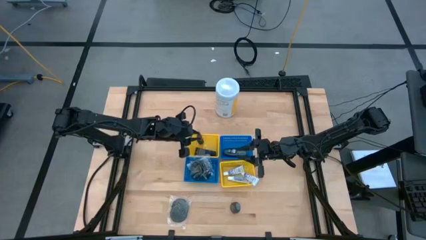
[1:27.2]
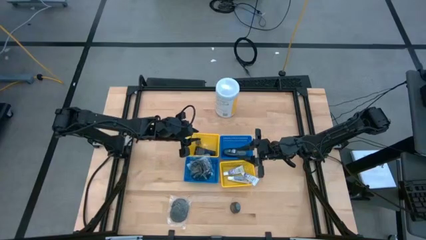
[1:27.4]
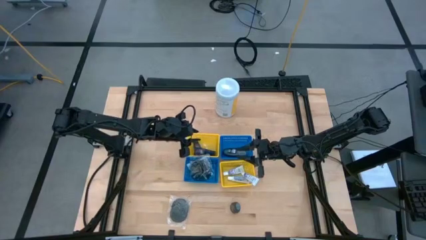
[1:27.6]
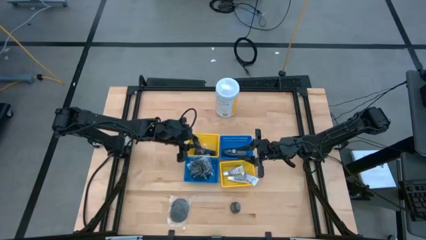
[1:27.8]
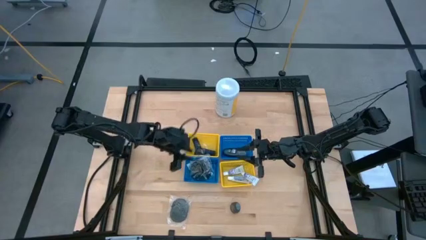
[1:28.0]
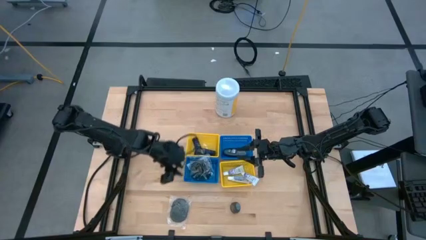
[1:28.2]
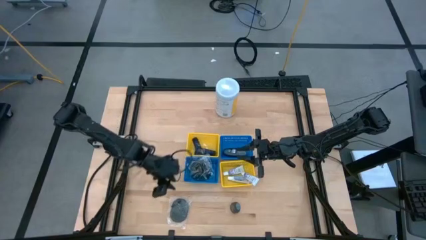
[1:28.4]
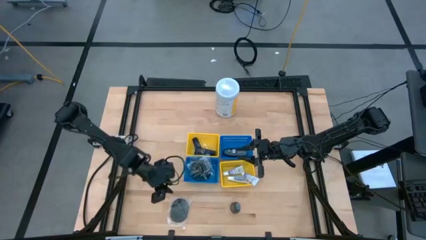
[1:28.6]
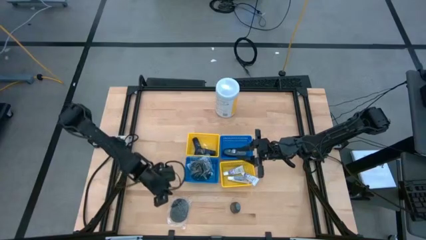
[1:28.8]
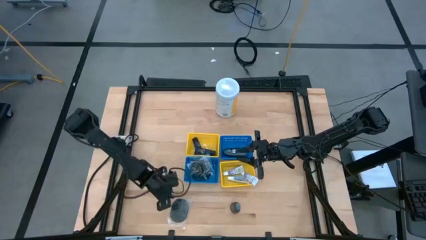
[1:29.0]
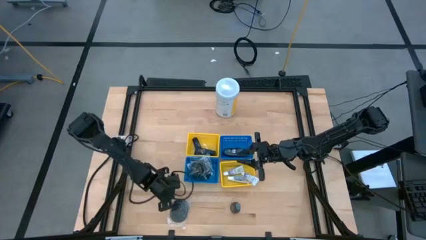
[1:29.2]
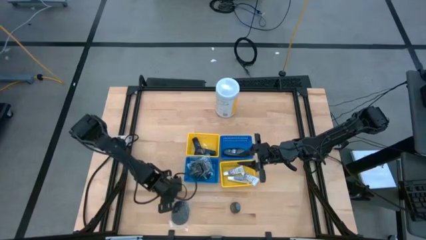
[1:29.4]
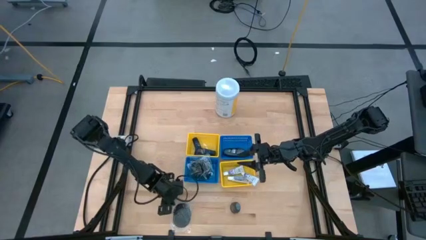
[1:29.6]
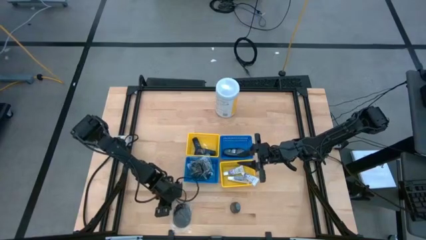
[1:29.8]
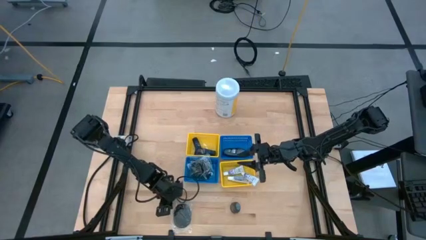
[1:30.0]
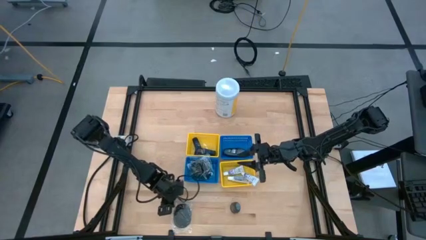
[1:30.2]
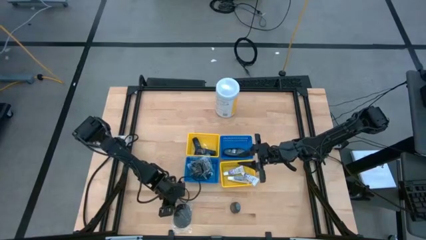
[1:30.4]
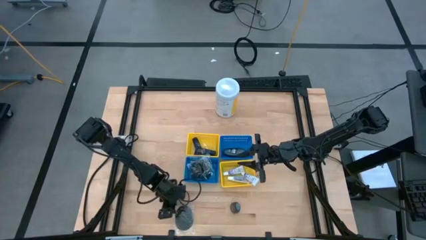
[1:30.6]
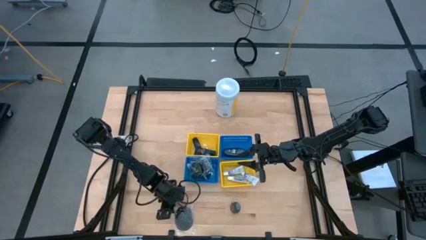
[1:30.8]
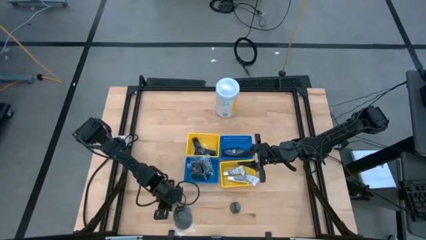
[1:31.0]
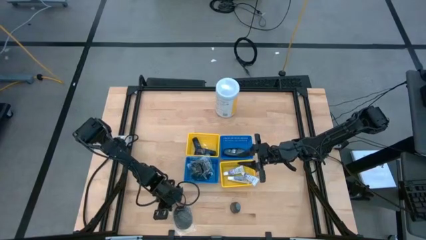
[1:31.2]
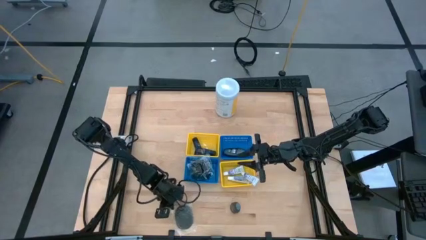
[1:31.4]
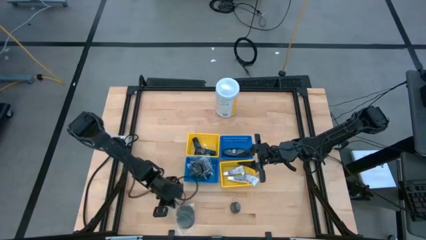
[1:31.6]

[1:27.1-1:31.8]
Task: Pick & Place Travel size toiletries
Put the black hairbrush into the bottom blue bin

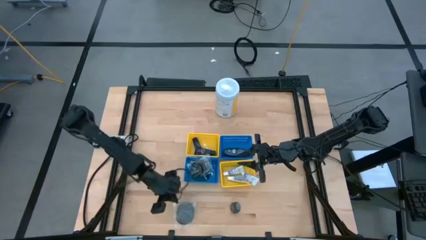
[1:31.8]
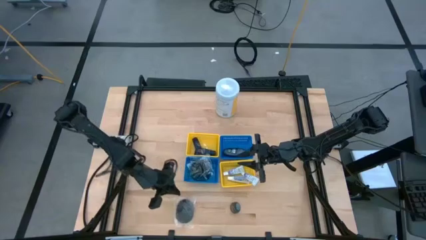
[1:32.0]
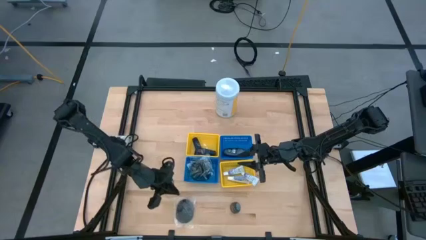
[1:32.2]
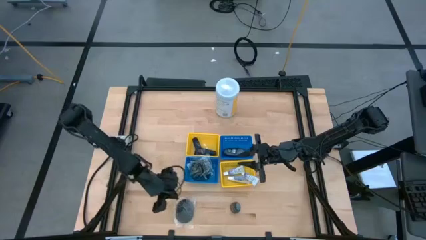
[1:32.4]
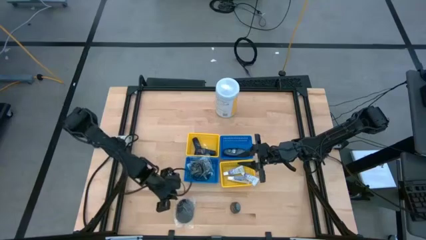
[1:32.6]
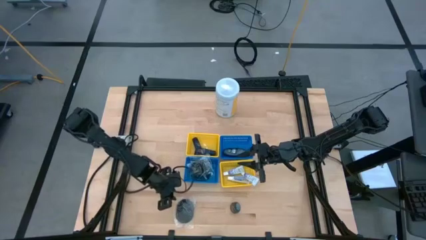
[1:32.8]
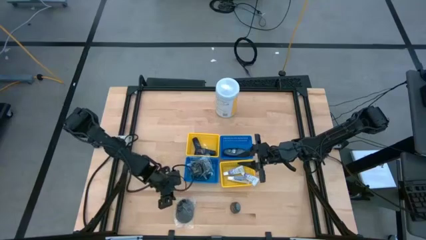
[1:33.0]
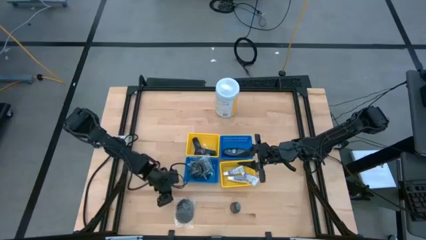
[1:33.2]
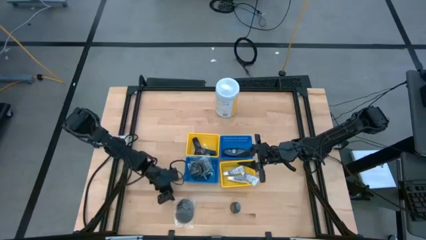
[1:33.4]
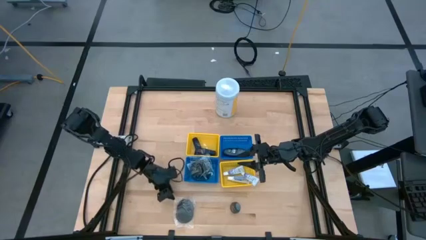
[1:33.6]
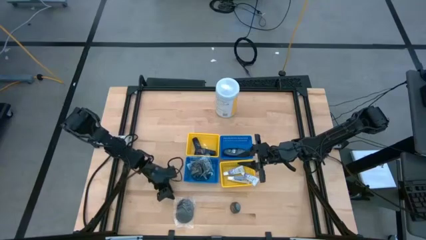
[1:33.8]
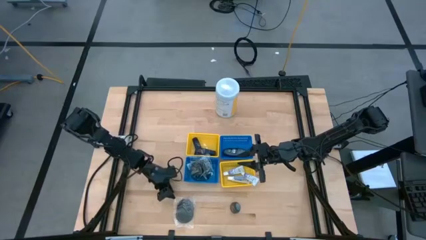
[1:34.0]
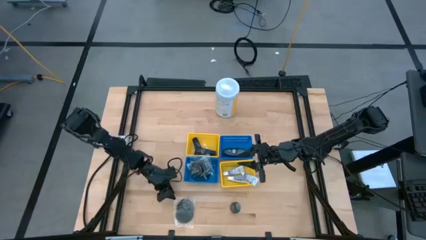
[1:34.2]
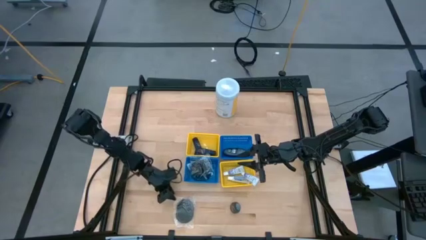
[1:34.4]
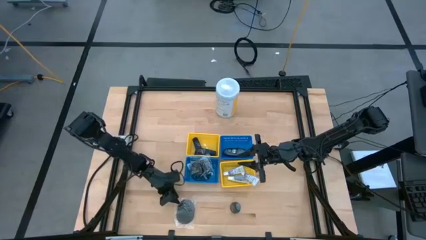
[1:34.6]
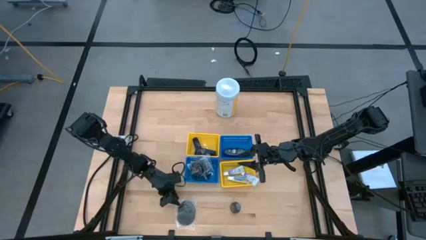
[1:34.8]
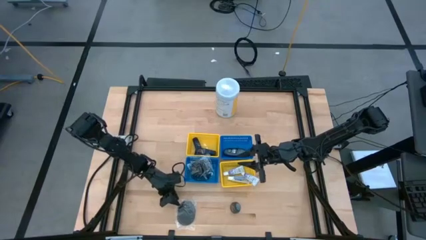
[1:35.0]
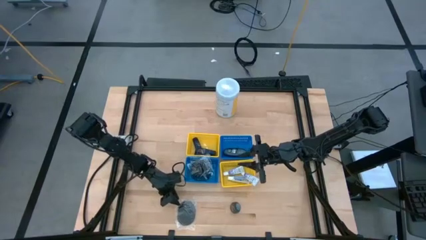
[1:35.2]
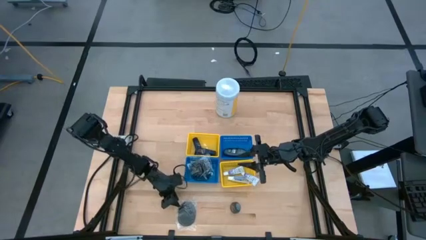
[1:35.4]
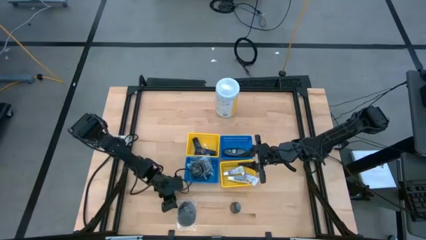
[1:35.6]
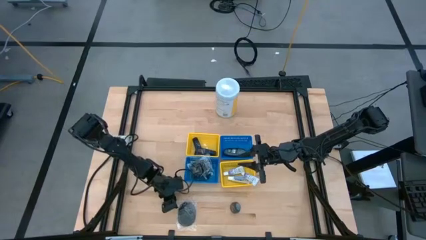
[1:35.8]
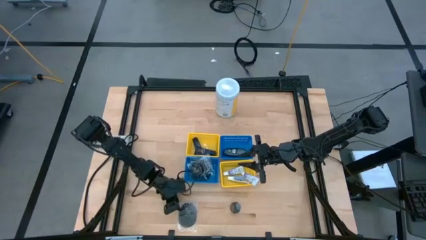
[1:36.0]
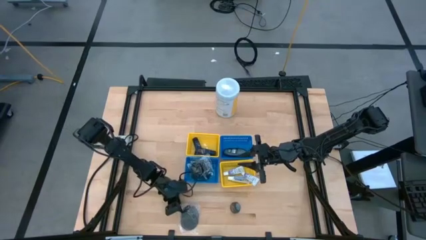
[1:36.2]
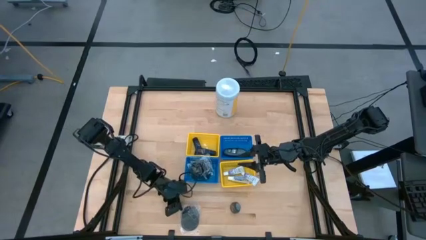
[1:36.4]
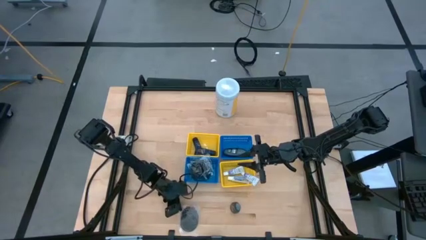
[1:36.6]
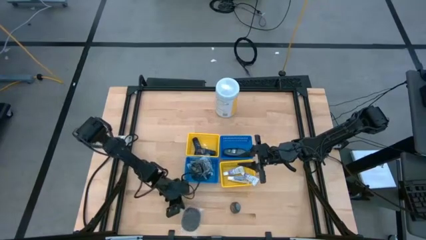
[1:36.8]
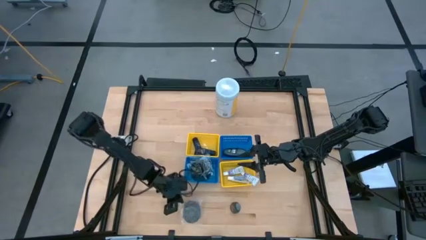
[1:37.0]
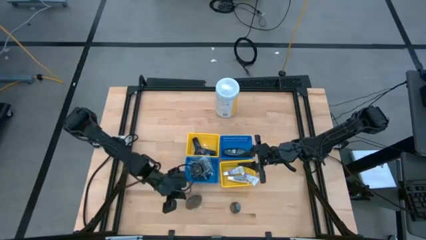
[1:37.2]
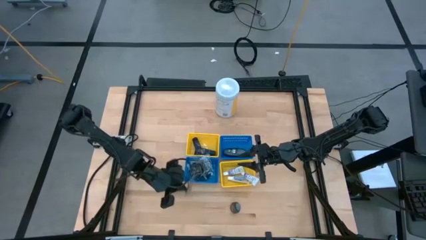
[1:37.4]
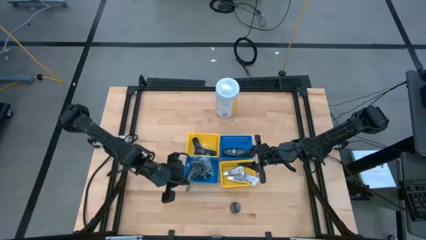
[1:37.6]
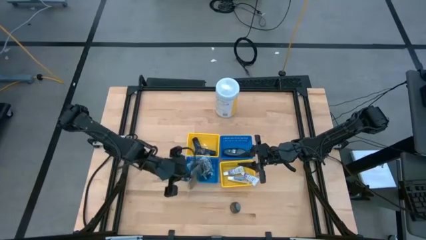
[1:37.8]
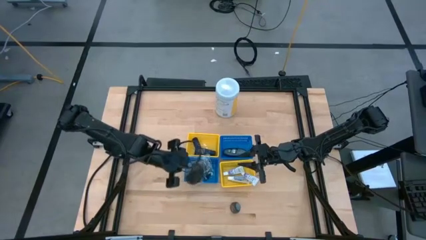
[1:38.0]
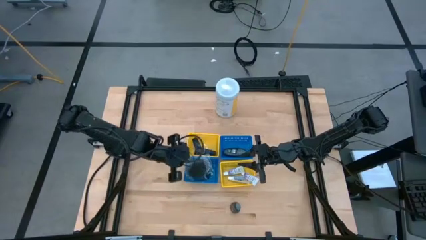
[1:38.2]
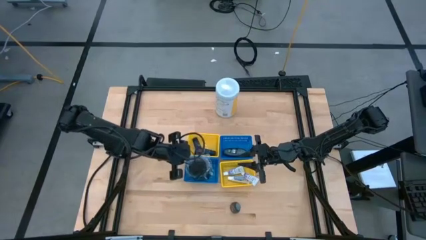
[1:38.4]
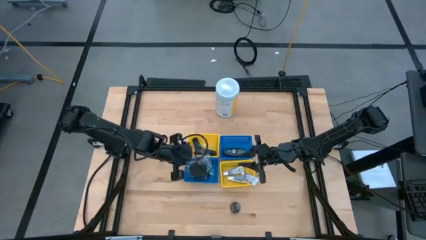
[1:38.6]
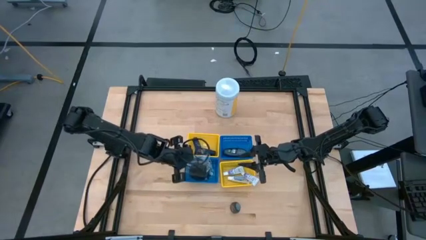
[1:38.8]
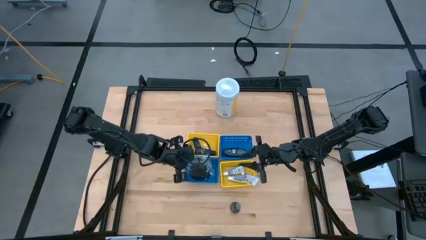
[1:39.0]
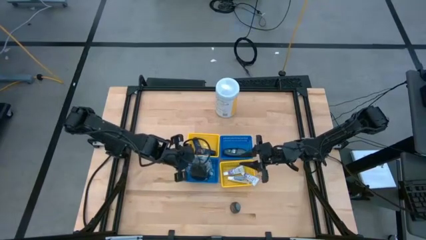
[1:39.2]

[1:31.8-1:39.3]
Put the black hairbrush into the bottom blue bin

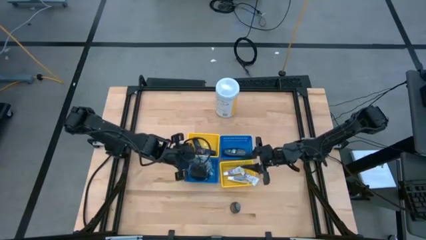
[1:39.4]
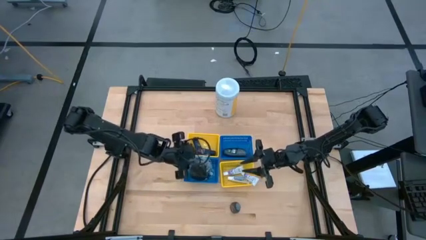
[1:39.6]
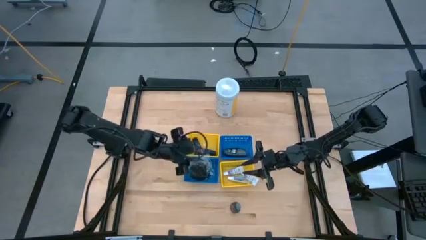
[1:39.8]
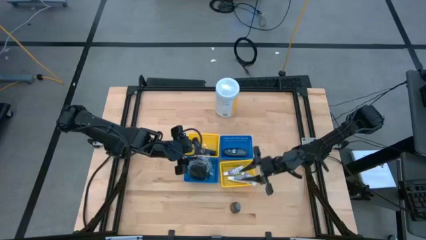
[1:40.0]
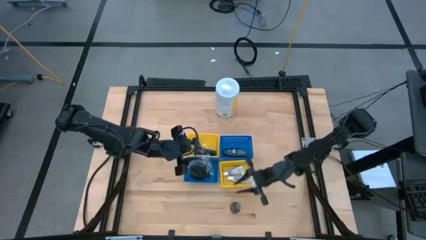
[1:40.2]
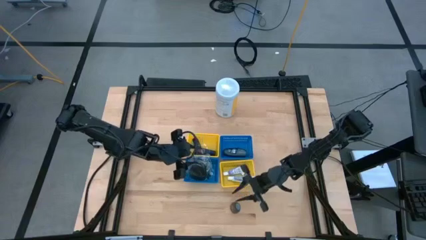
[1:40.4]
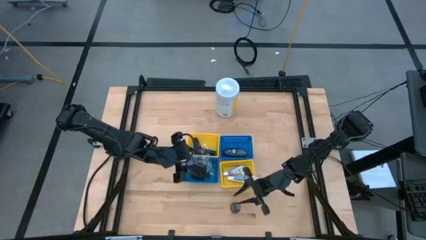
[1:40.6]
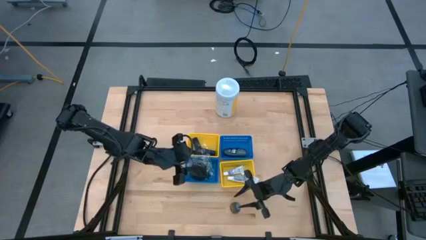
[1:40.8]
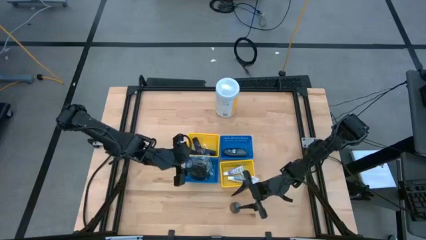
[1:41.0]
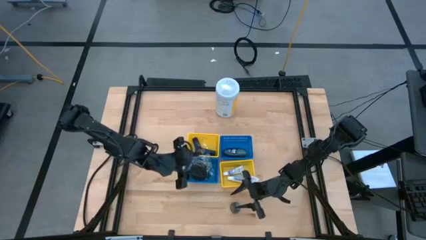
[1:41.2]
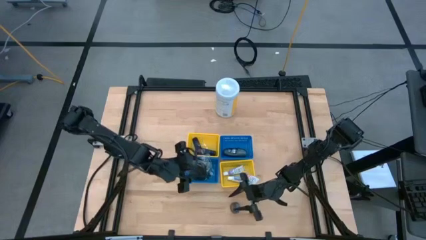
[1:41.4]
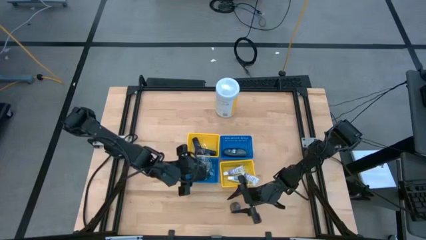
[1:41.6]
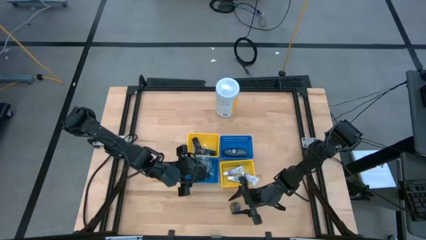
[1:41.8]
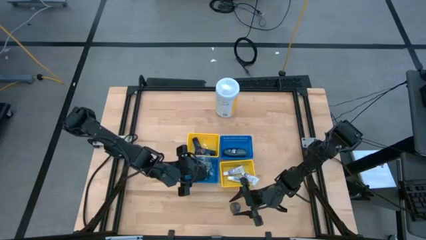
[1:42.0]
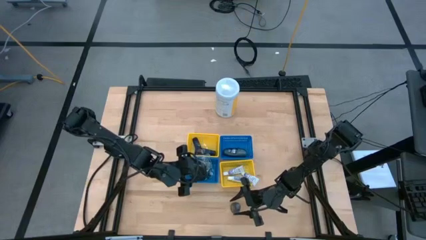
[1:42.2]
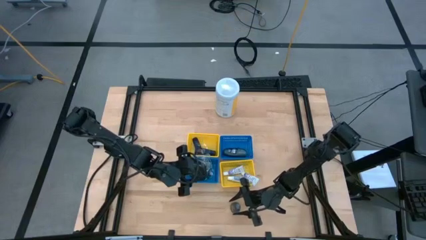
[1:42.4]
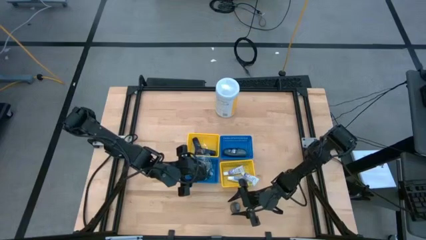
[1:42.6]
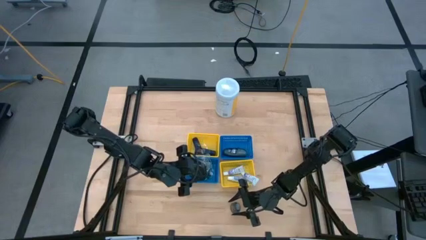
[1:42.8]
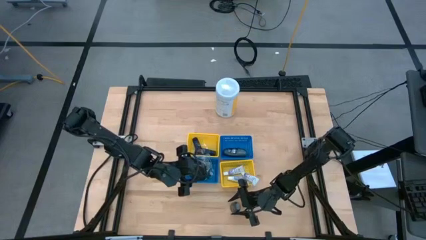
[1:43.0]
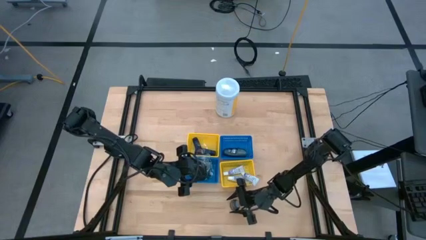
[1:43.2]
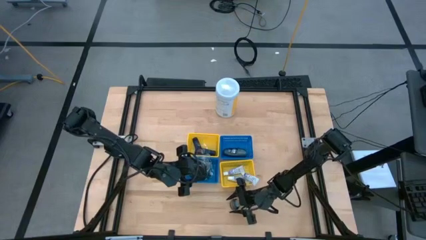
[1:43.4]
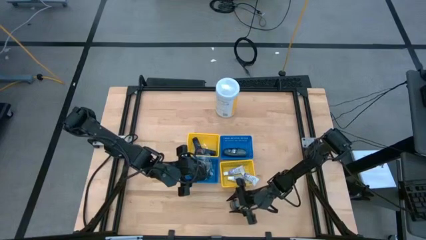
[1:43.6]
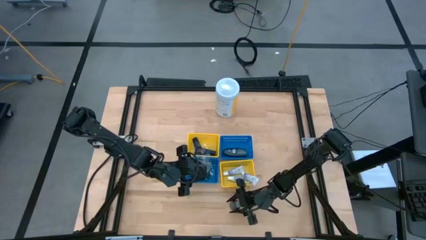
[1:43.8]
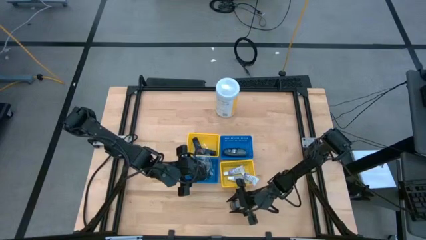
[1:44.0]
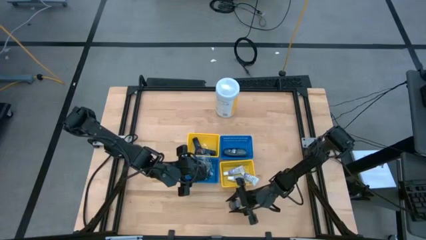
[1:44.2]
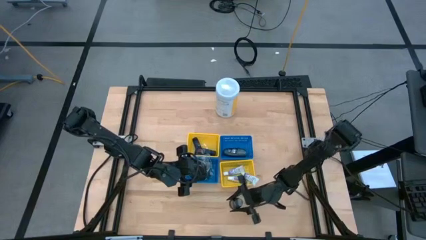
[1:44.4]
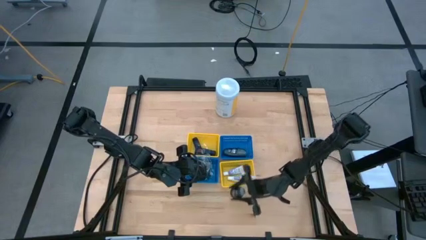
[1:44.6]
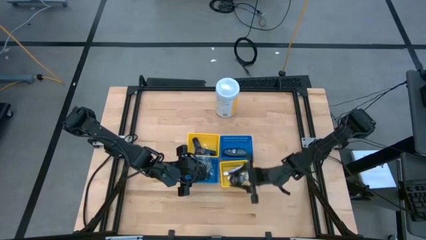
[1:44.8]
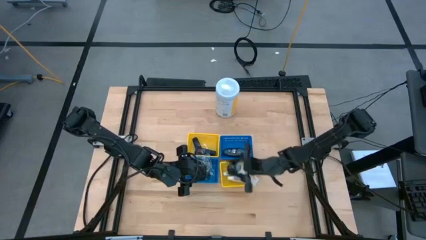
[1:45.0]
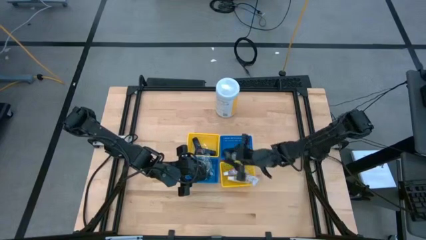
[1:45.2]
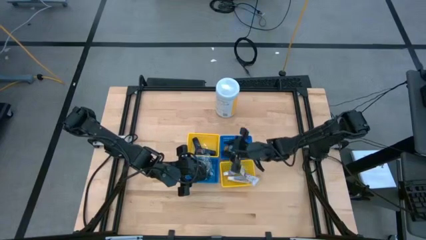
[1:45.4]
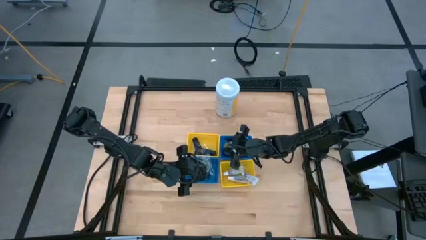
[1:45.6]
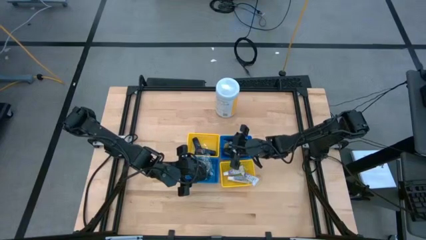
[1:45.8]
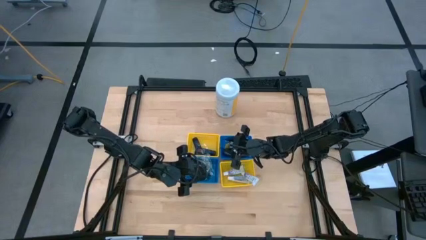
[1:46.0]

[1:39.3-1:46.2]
Put the gray deodorant into the top blue bin
